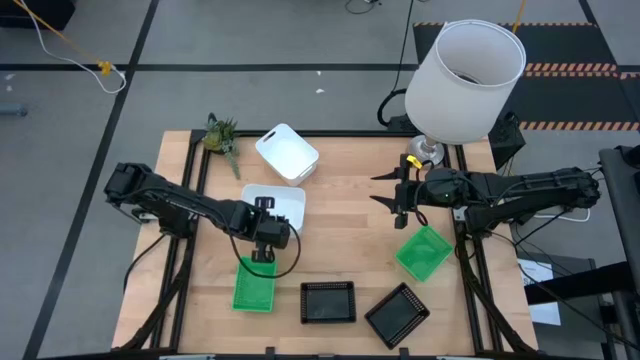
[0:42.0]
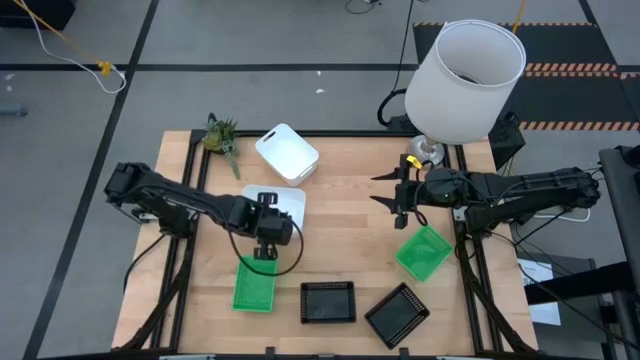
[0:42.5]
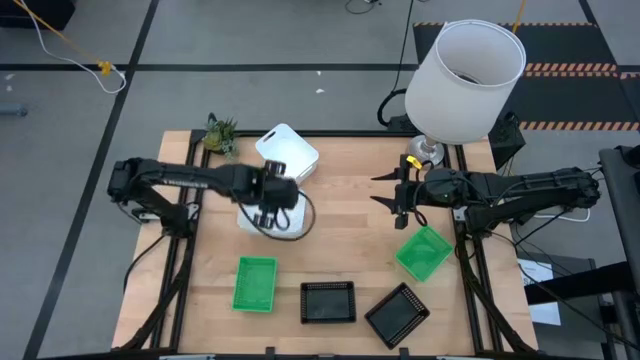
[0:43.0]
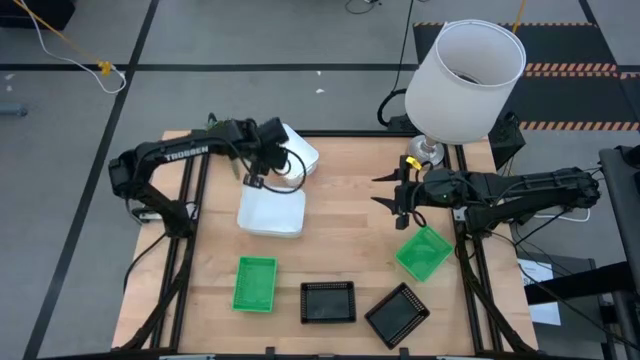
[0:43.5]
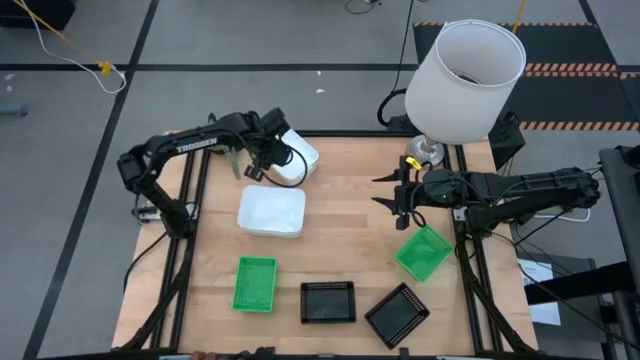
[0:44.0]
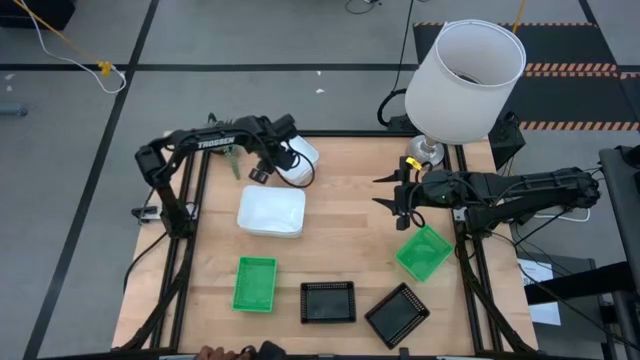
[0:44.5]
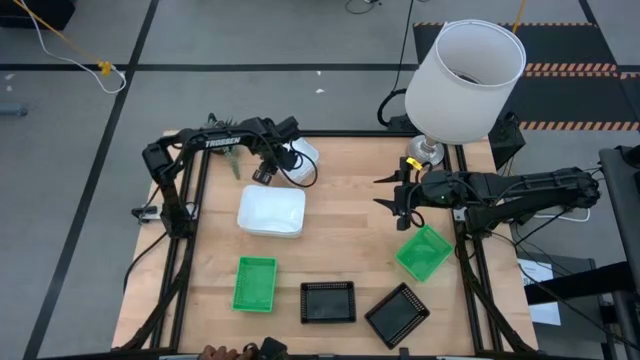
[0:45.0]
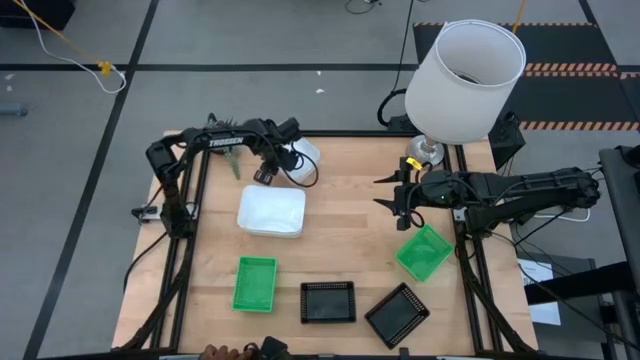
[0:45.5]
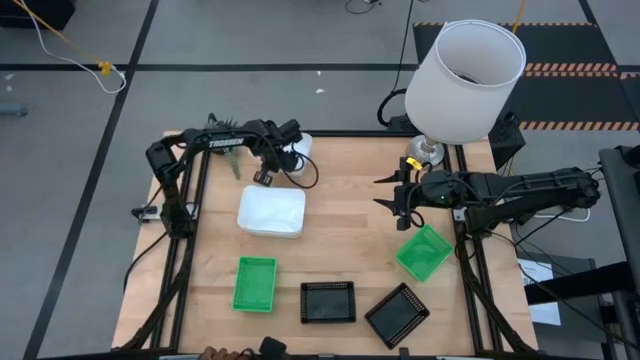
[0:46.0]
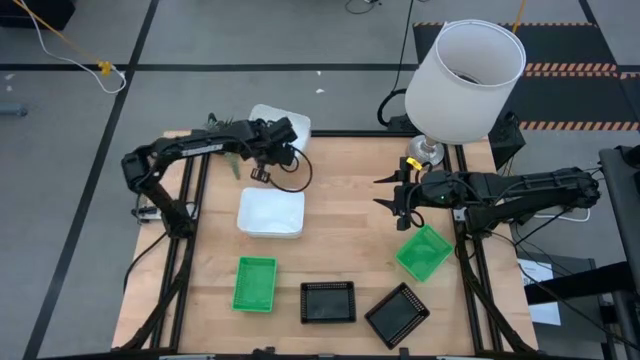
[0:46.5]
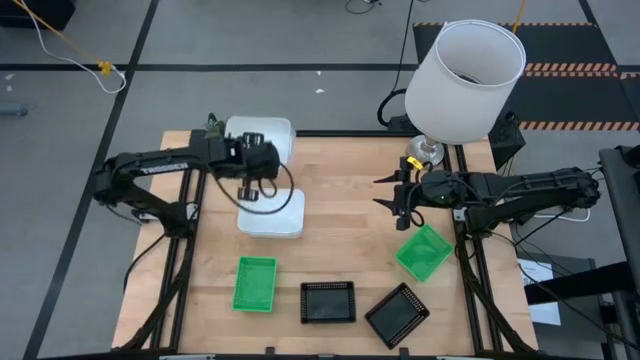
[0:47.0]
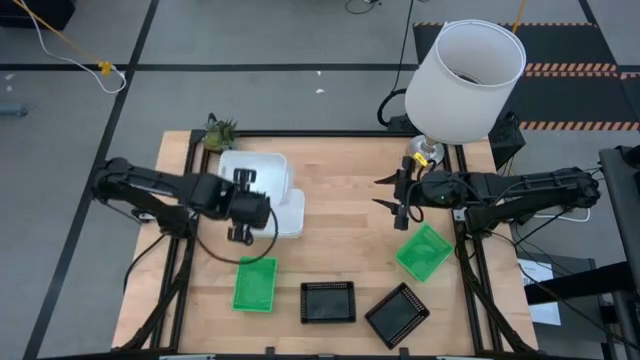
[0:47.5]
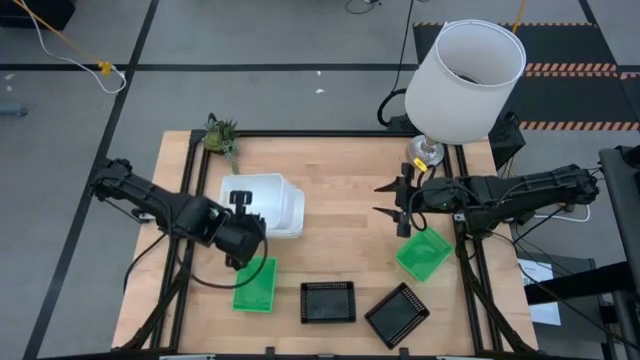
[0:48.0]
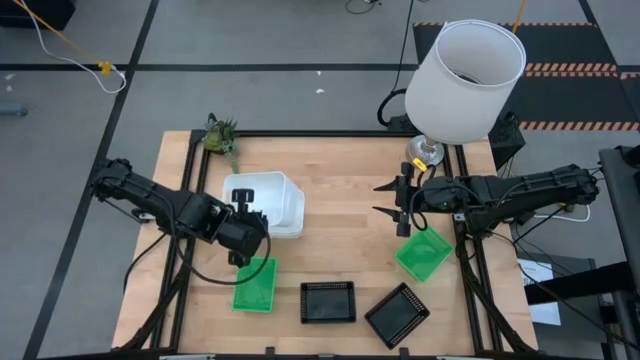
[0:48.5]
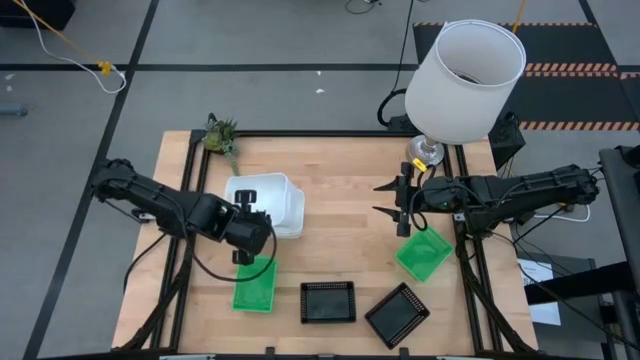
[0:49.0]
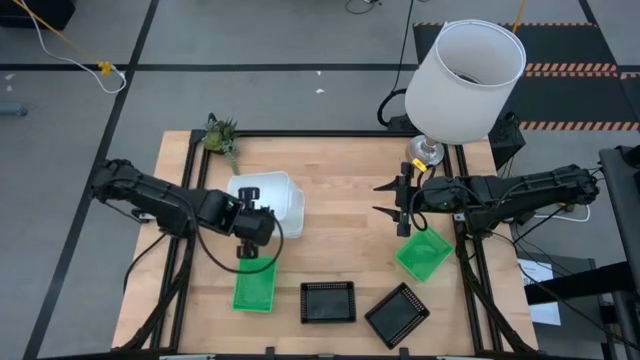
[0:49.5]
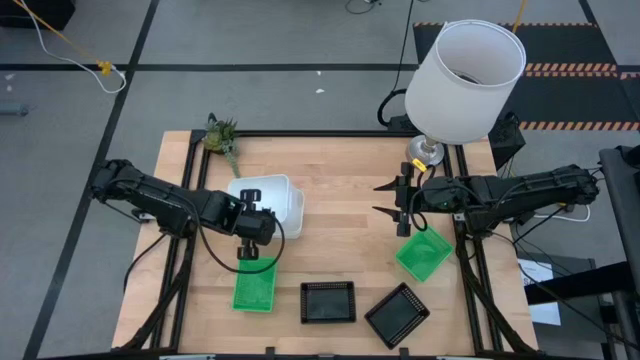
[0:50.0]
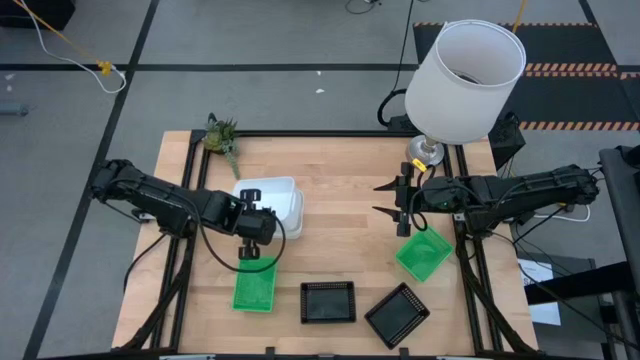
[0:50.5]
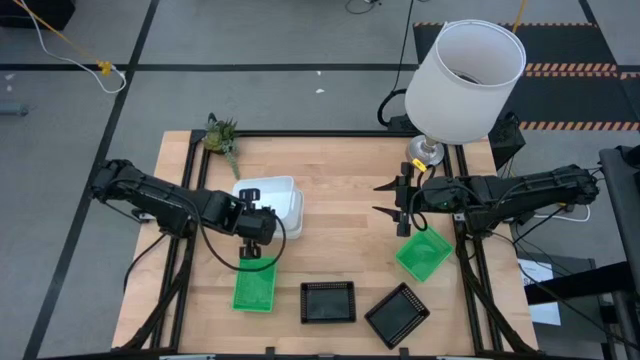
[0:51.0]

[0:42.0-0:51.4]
Stack the top white bin into the stacked bottom white bins

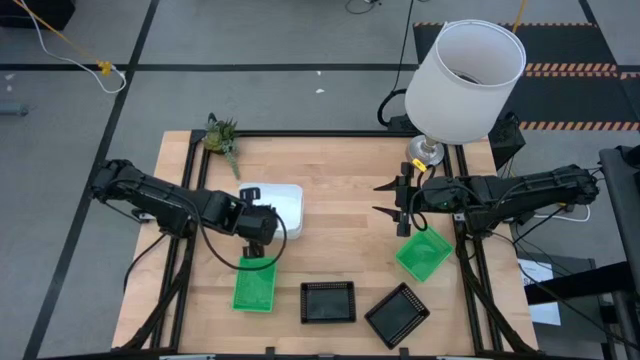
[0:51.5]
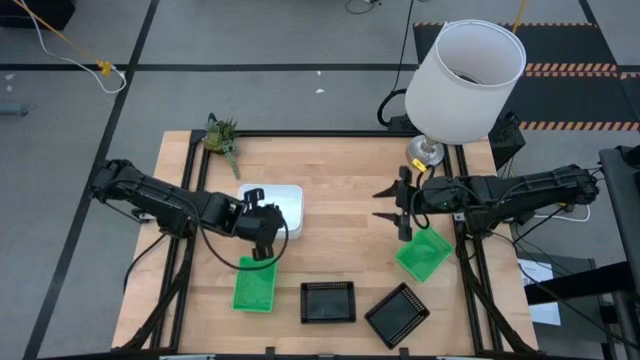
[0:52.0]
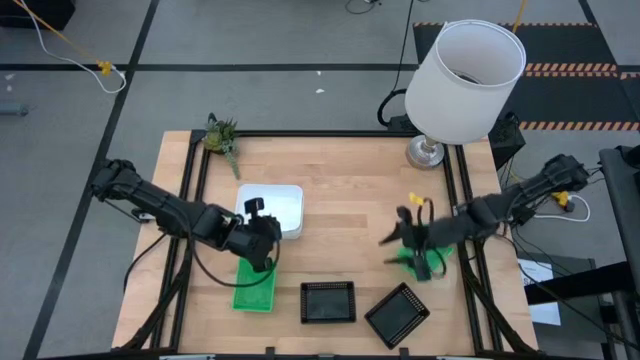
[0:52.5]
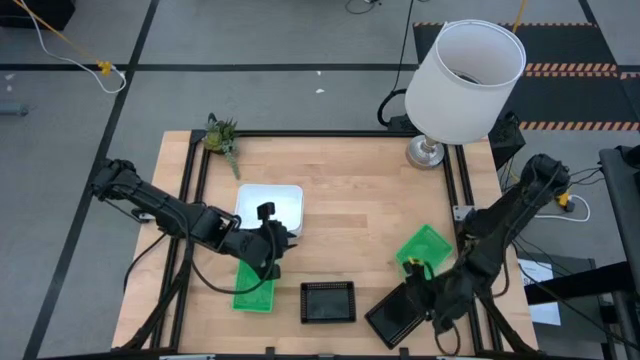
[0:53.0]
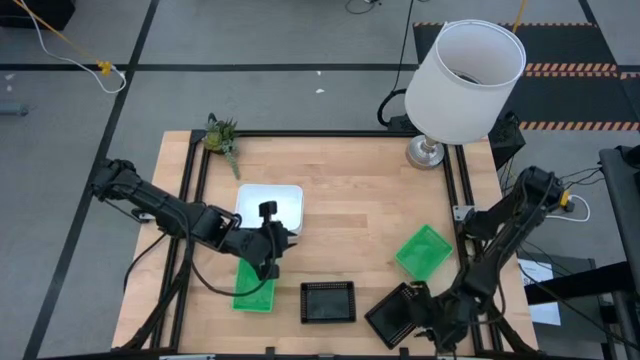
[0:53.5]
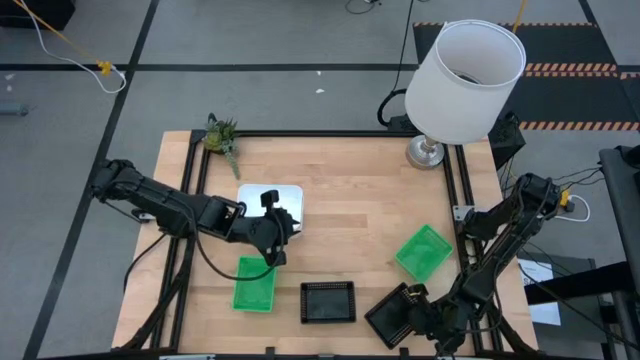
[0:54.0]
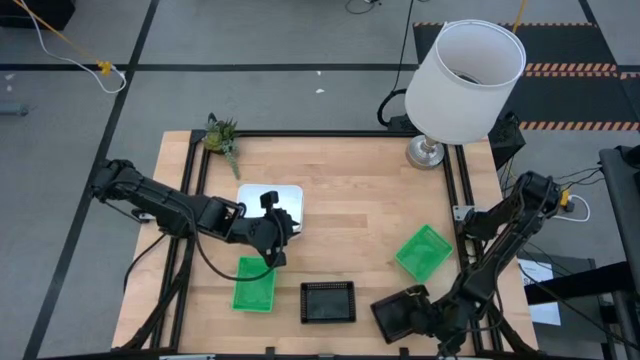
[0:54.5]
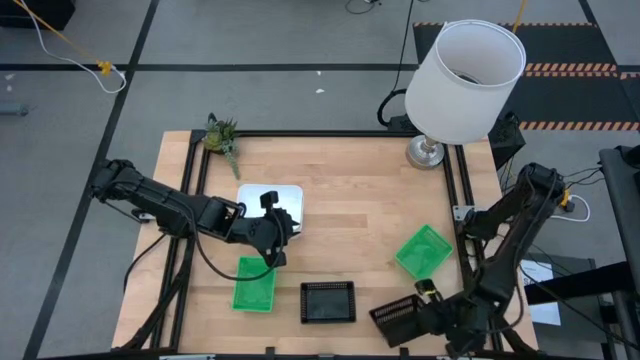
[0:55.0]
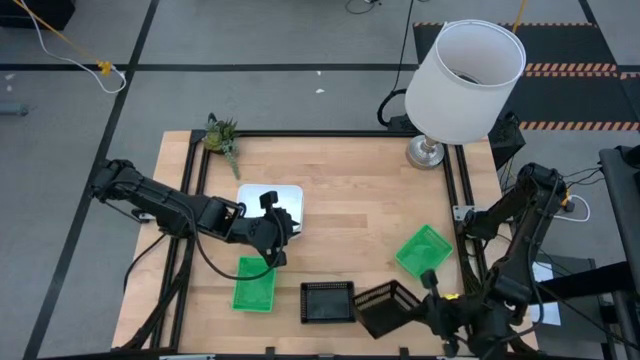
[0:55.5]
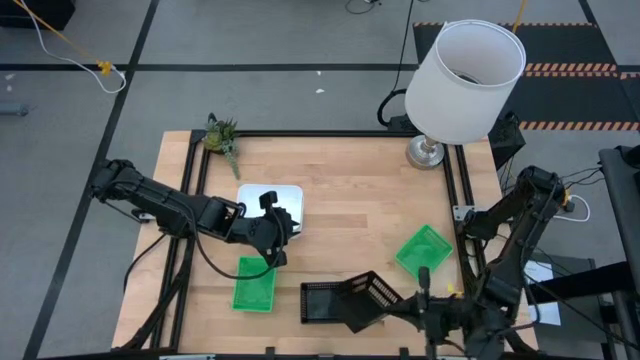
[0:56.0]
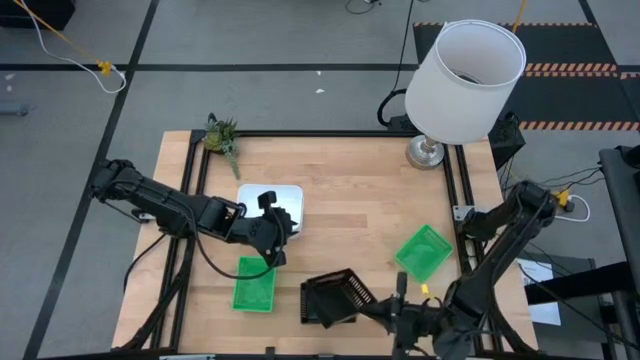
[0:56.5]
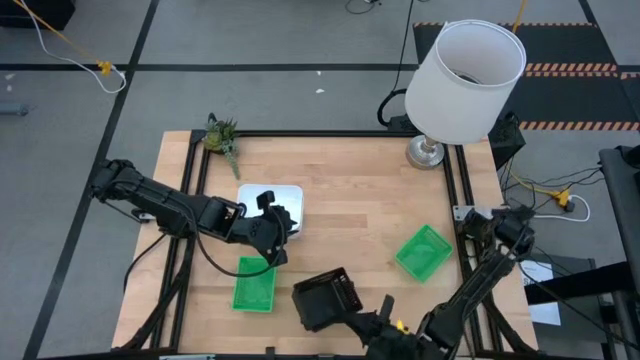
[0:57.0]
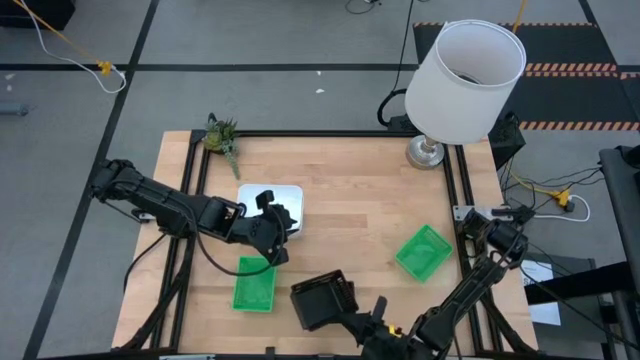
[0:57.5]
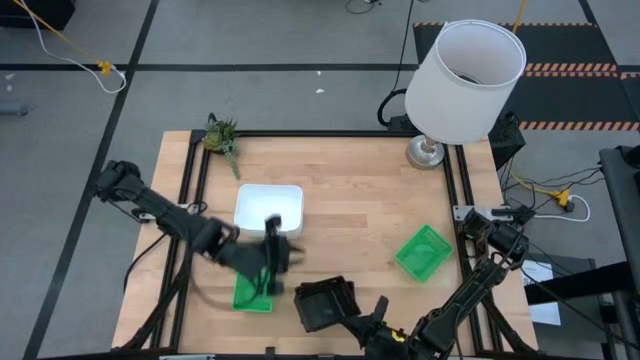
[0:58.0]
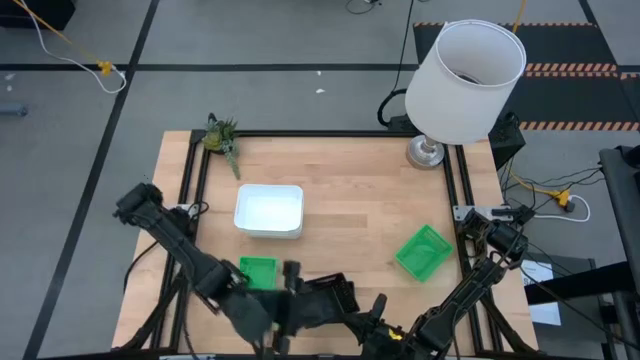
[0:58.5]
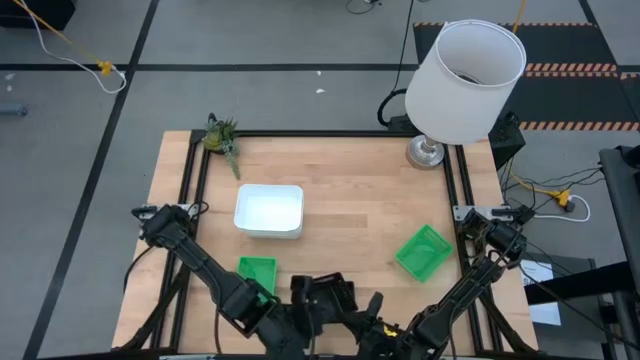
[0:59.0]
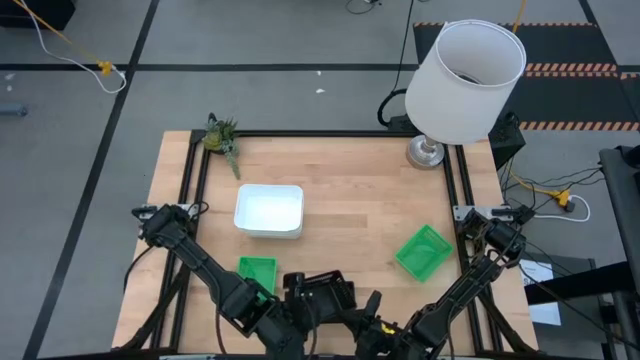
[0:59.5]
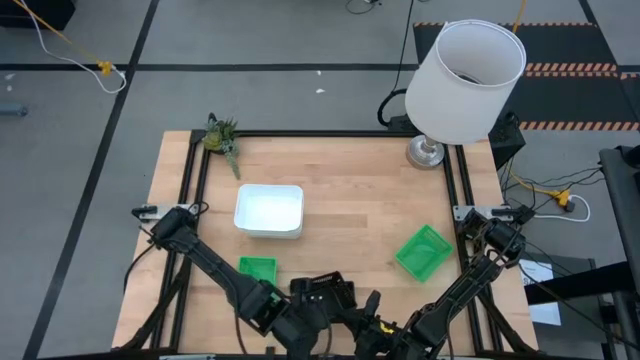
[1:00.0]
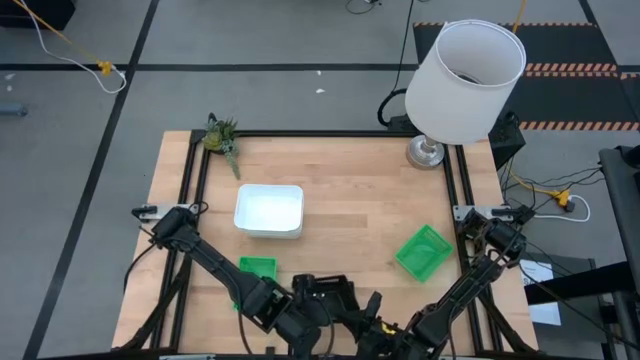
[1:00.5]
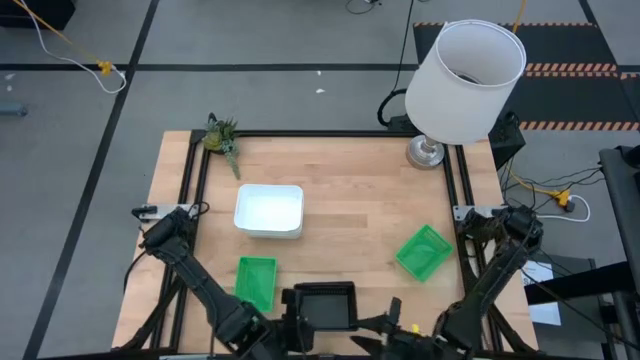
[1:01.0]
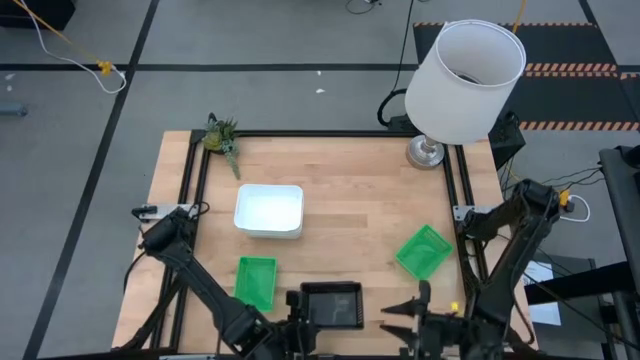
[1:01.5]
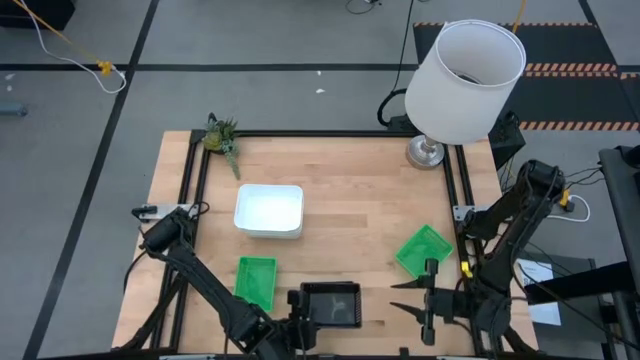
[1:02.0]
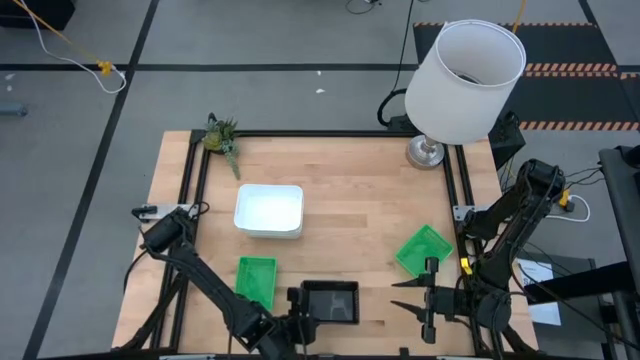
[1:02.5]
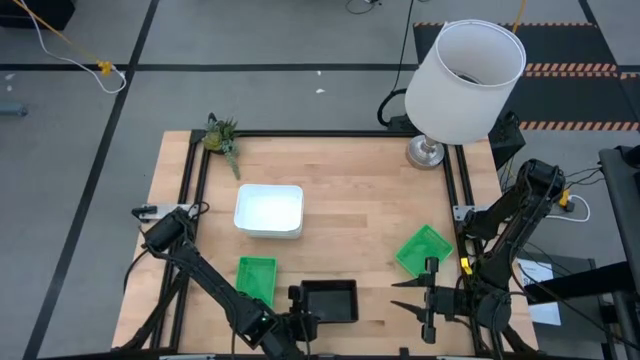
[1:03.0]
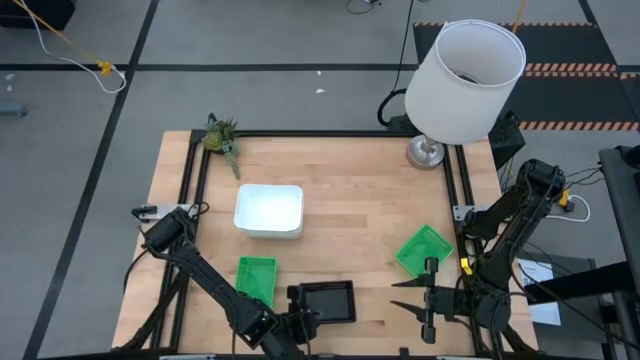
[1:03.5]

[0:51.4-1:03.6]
Stack the right black bin into the stacked left black bins
